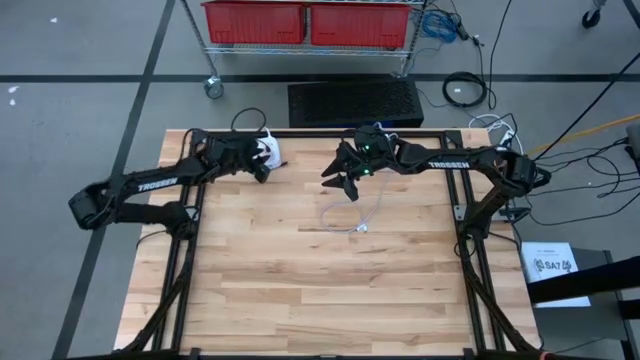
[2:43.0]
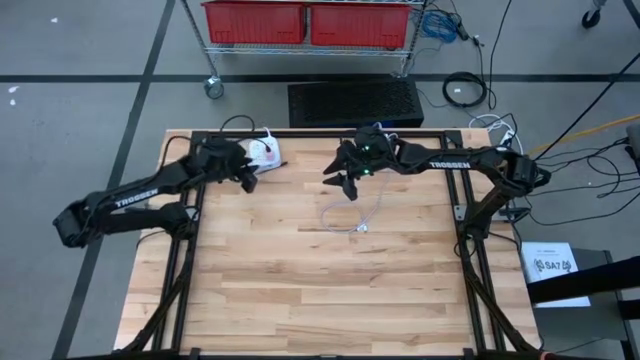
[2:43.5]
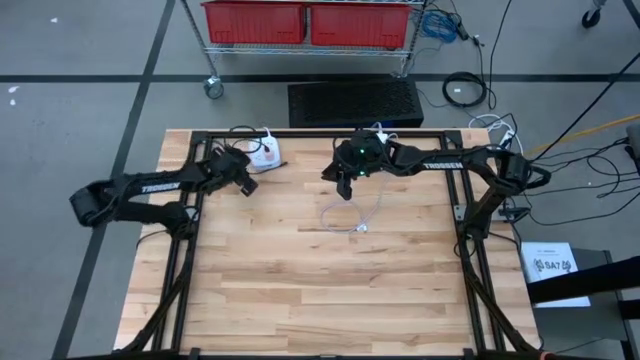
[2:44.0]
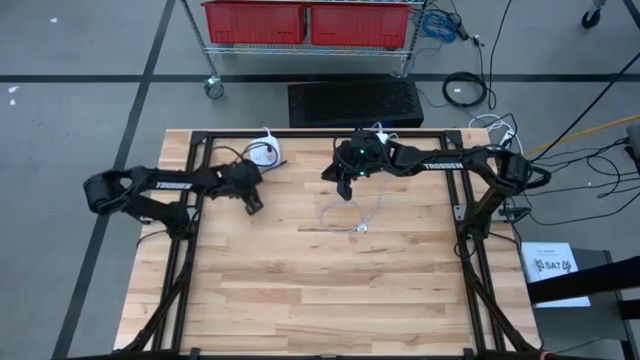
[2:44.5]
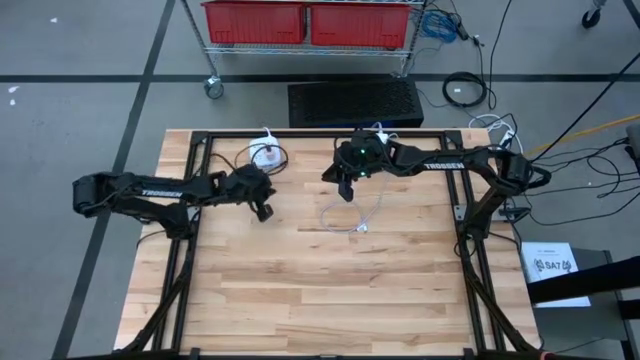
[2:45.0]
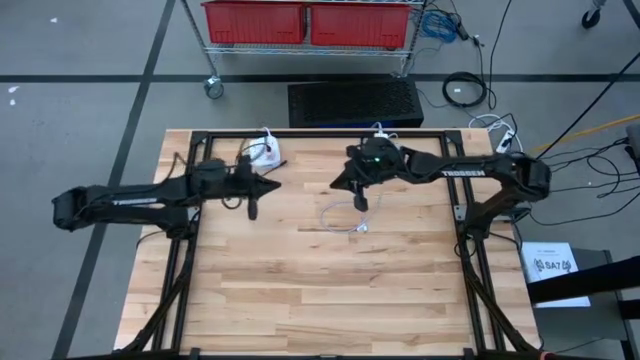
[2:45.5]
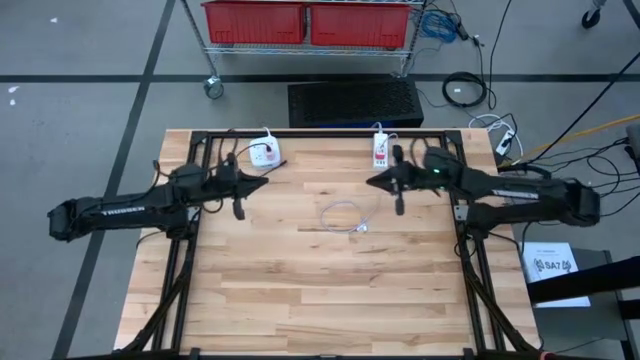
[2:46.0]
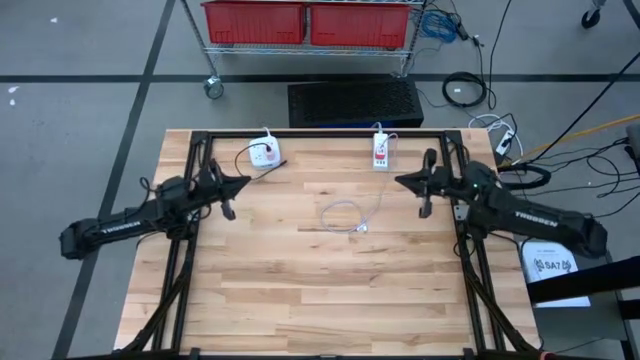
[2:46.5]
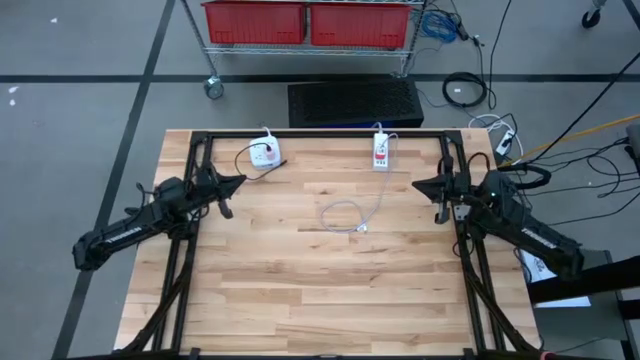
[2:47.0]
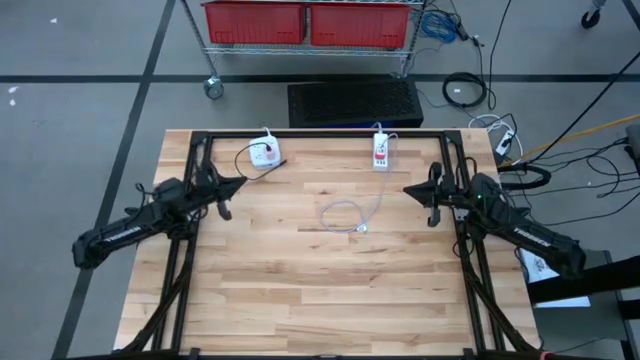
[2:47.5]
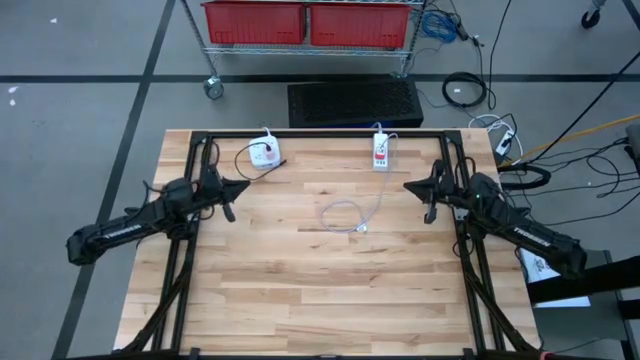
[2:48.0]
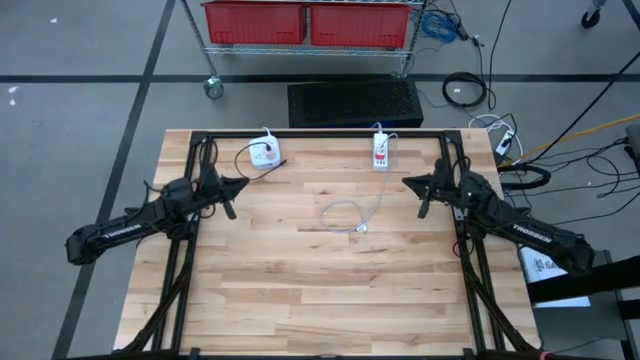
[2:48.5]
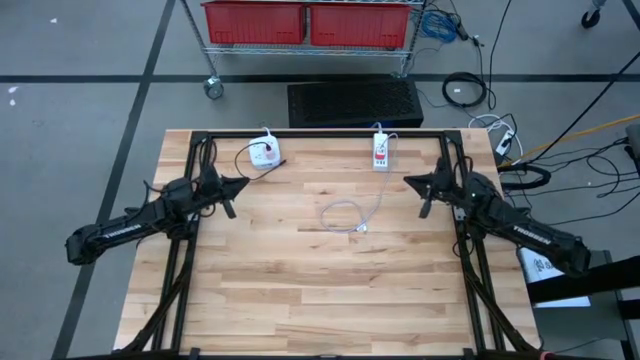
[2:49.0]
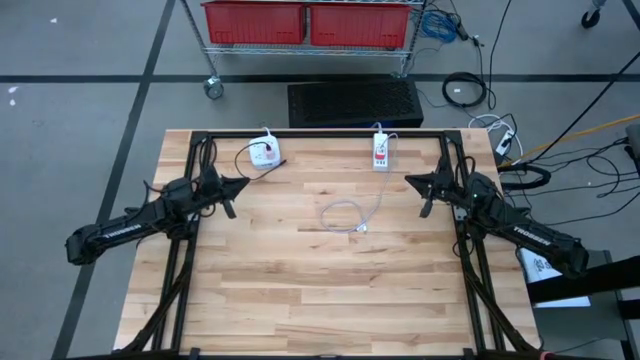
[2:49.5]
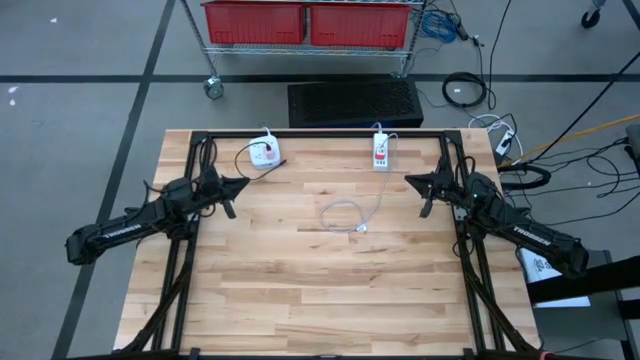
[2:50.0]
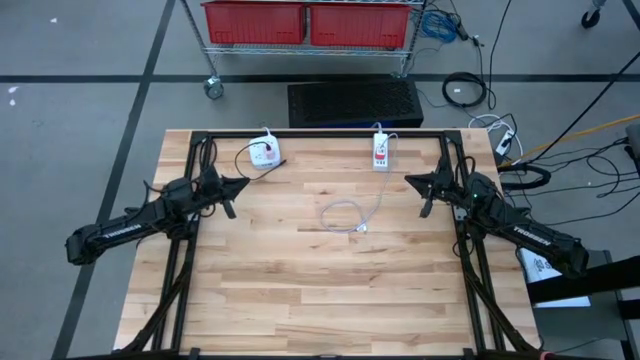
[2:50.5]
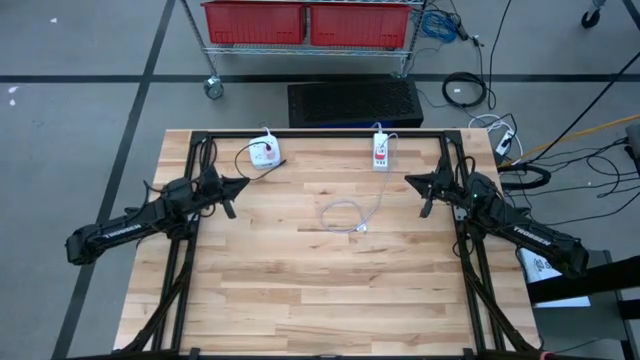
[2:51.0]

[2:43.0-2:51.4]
Task: Insert USB
Return to Home Position

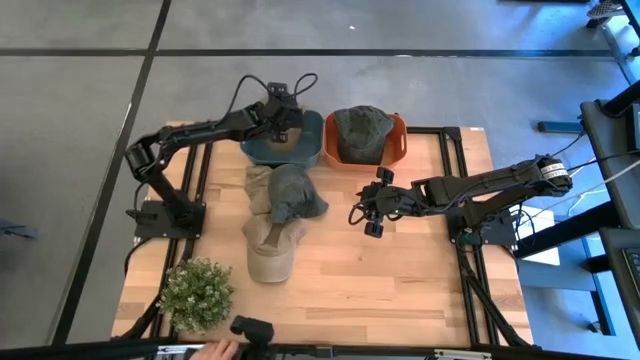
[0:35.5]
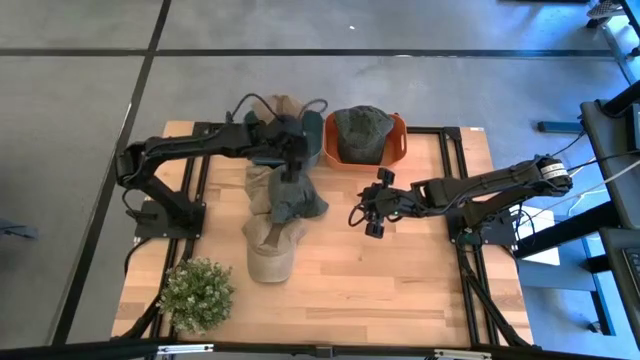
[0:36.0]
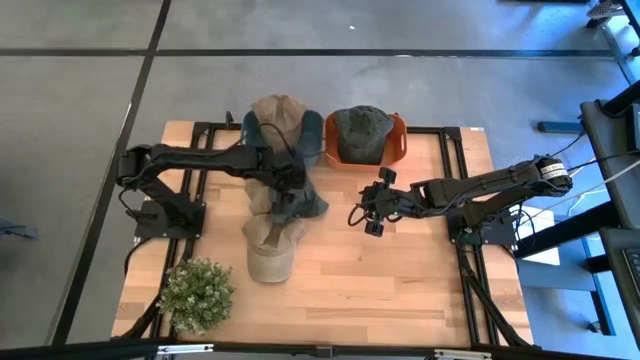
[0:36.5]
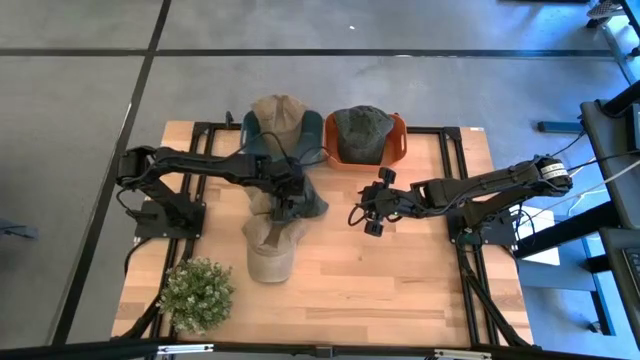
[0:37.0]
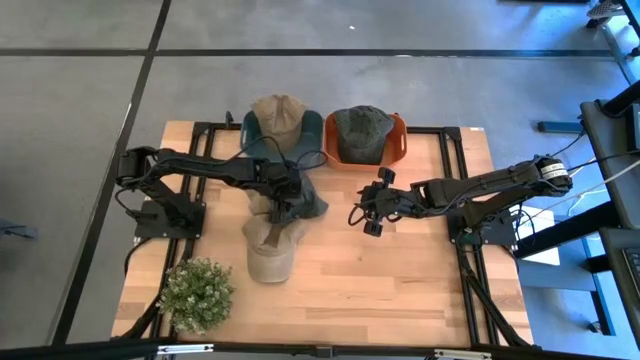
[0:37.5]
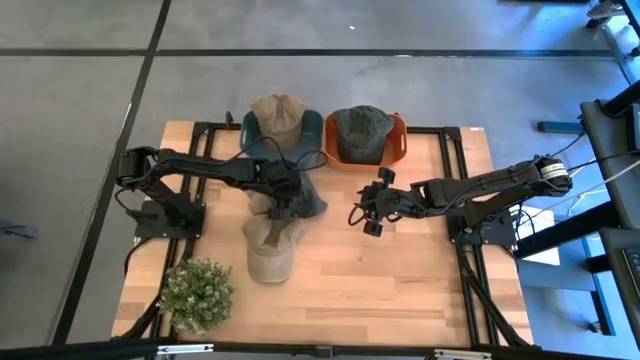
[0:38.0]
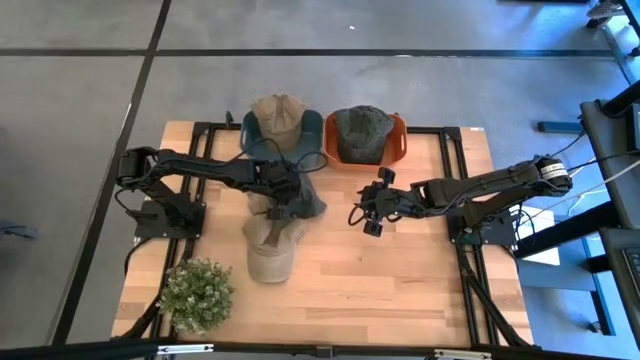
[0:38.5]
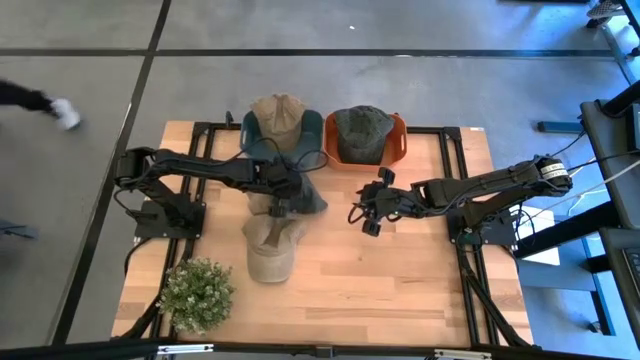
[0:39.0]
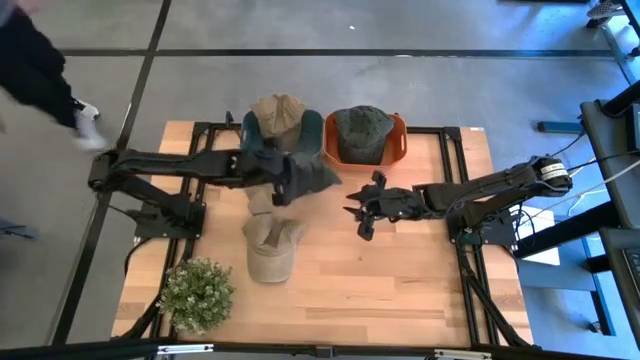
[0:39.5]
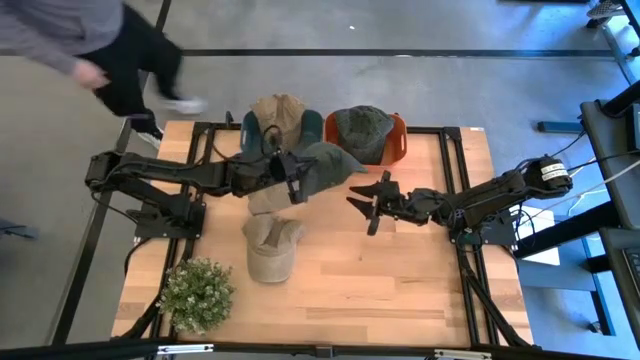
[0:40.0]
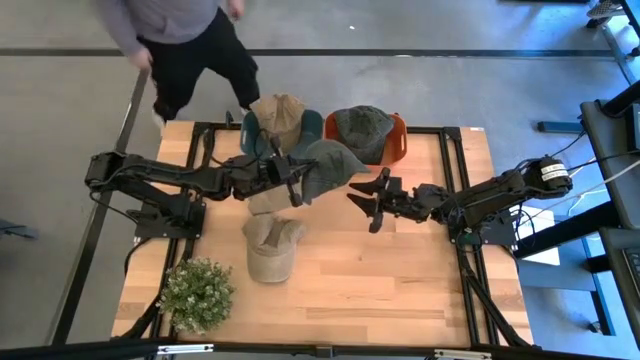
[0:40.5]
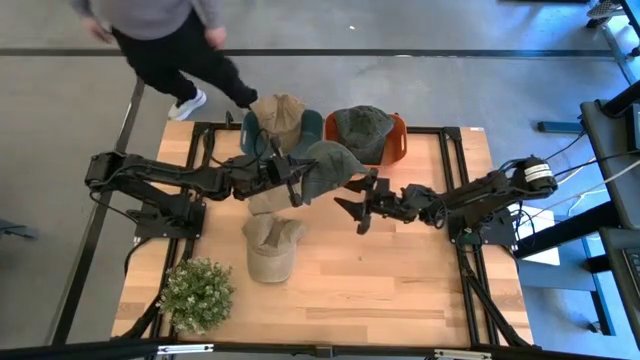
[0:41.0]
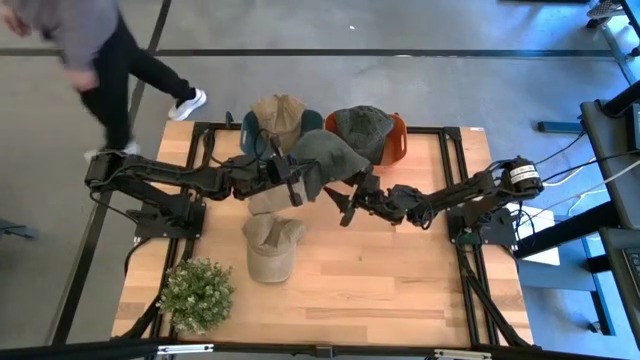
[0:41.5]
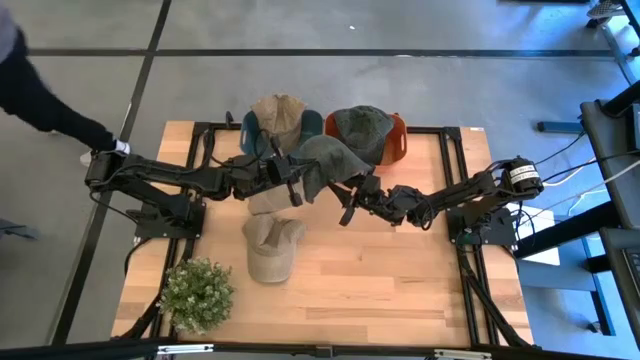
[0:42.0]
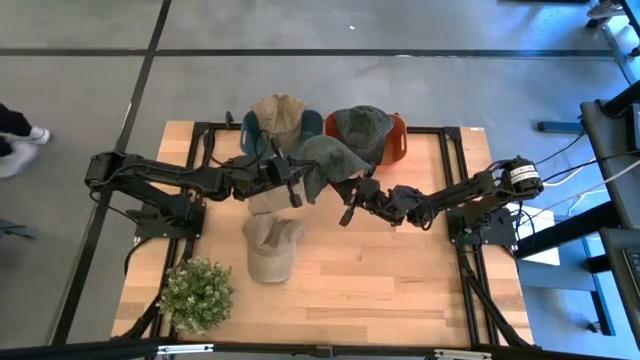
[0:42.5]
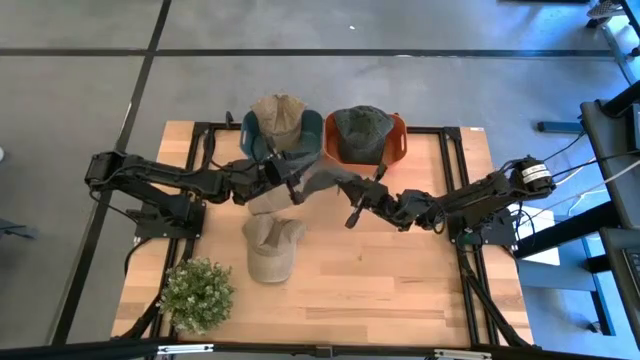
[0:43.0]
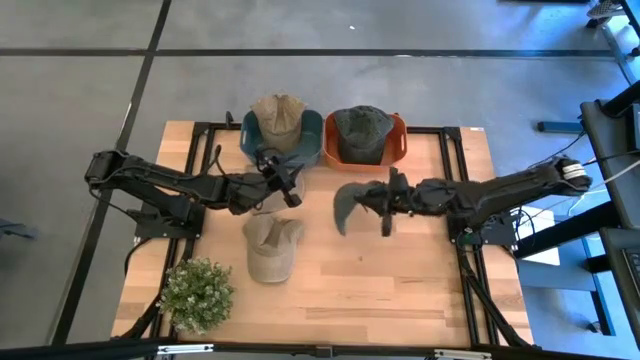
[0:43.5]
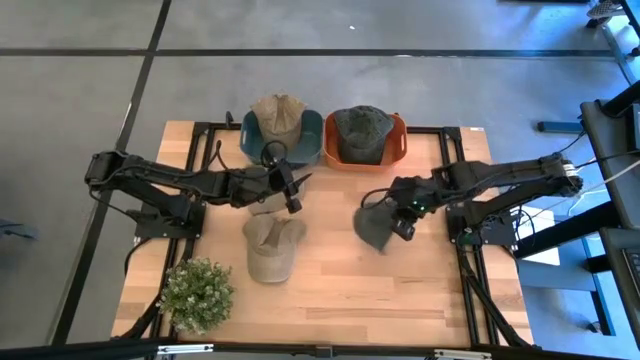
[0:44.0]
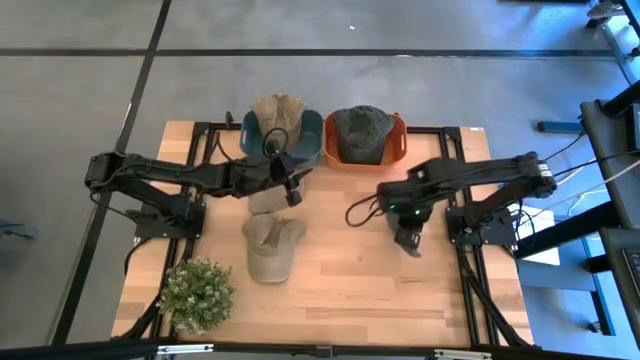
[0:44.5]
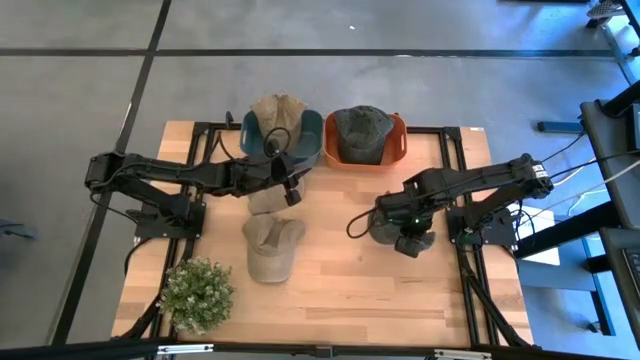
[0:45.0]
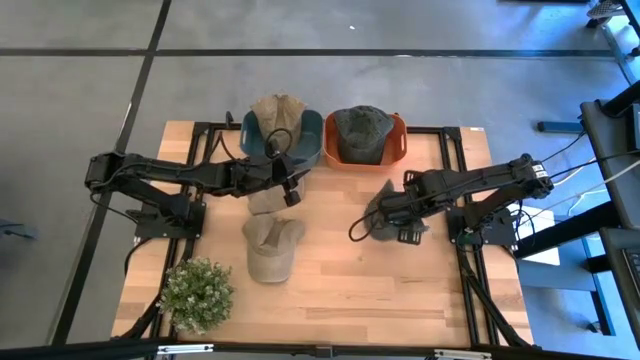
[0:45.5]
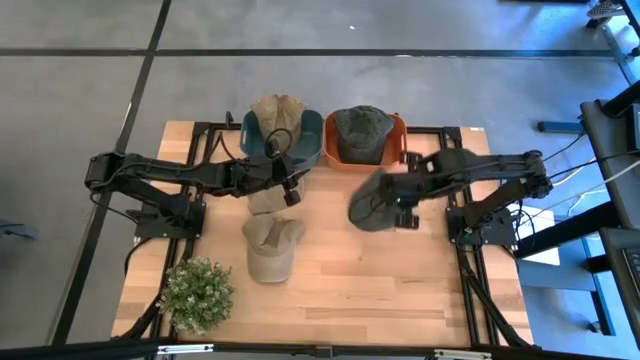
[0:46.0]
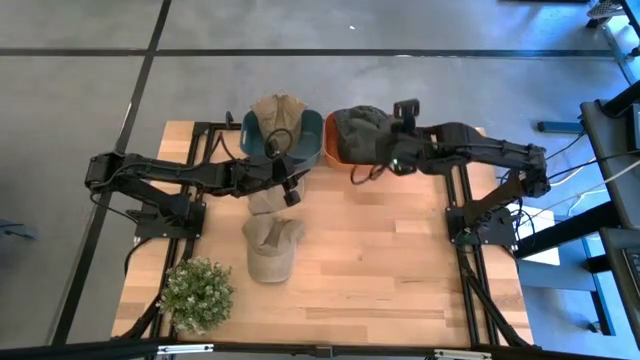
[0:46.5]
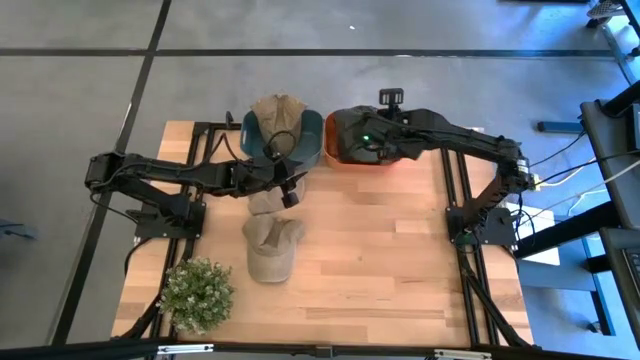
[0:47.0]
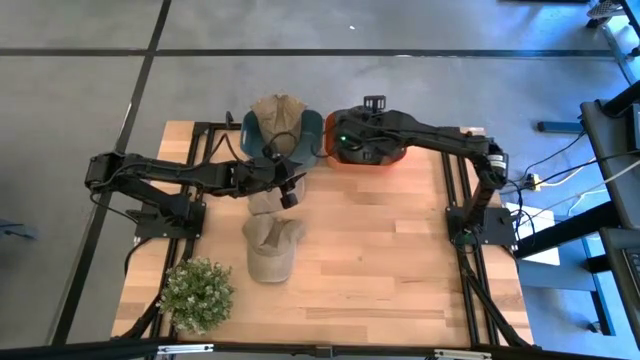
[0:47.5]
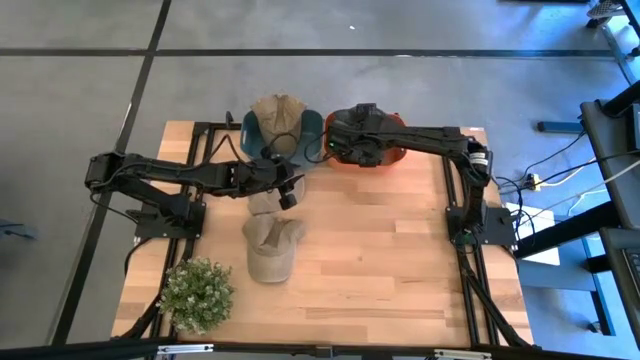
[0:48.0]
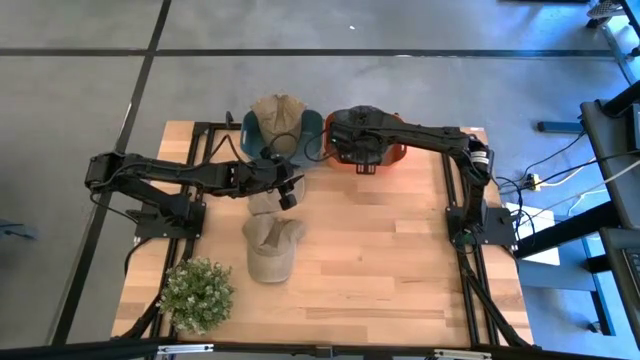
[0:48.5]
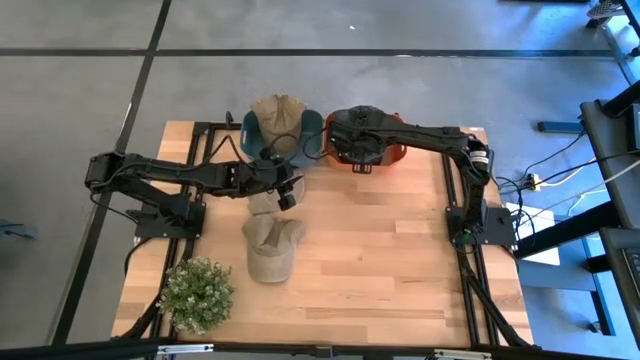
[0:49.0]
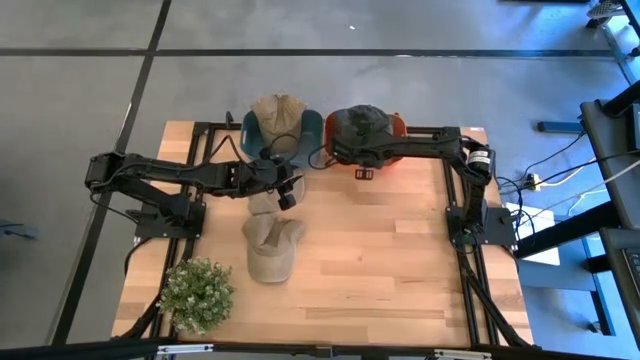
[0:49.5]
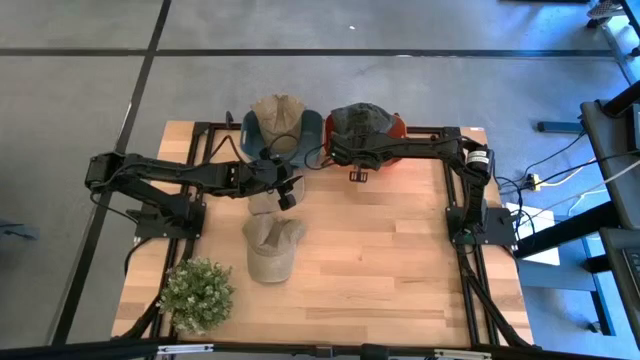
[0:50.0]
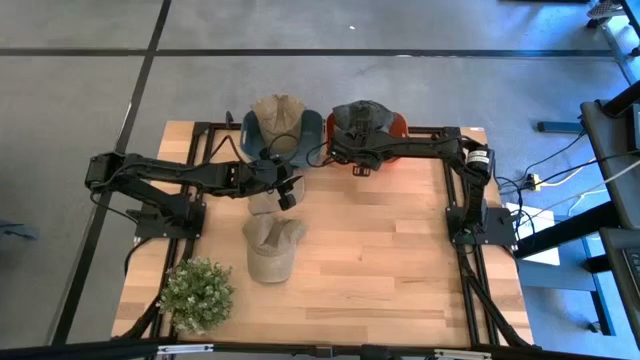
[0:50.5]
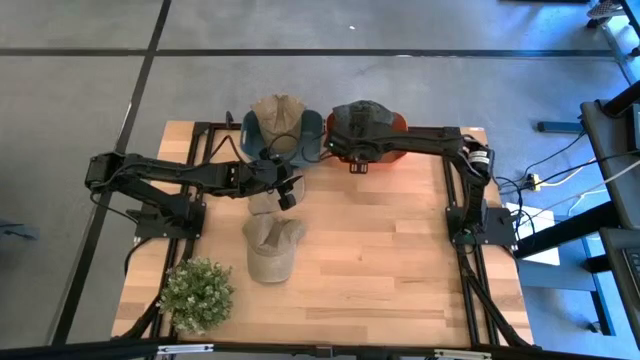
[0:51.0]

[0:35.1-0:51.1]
Task: Pick & Place hat
Put the black cap into the orange bin
